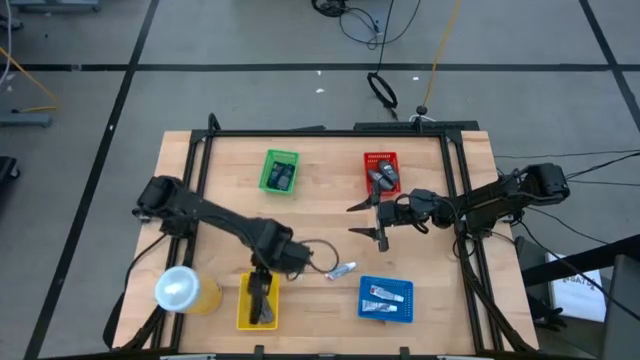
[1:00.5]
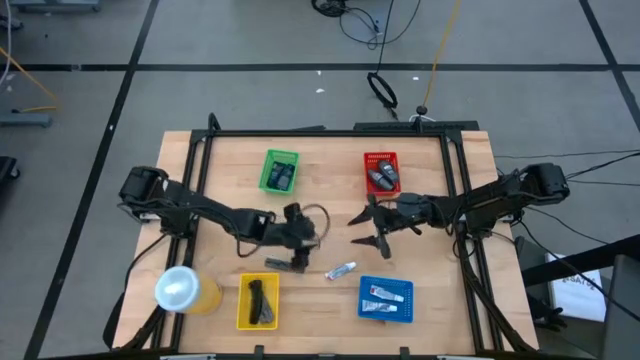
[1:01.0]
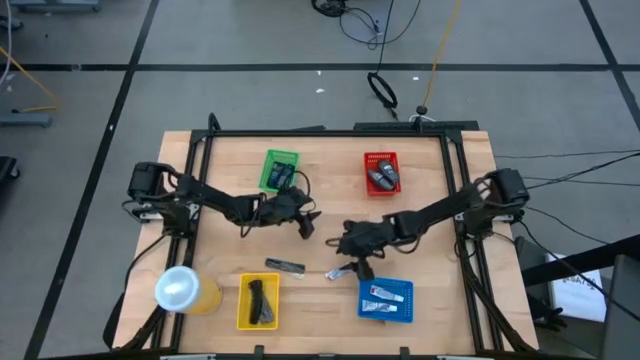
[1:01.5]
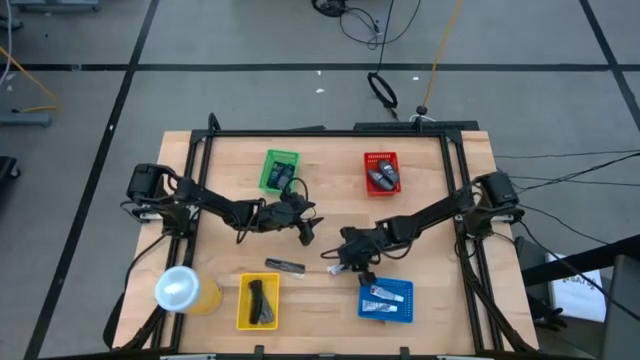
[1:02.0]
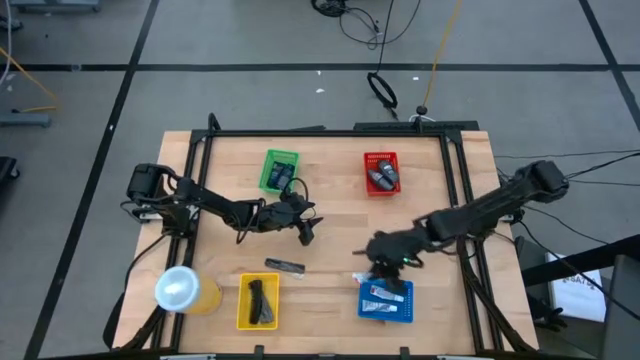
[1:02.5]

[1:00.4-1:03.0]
Task: Pick & Place Travel size toiletries
Put the white toothpaste into the blue bin

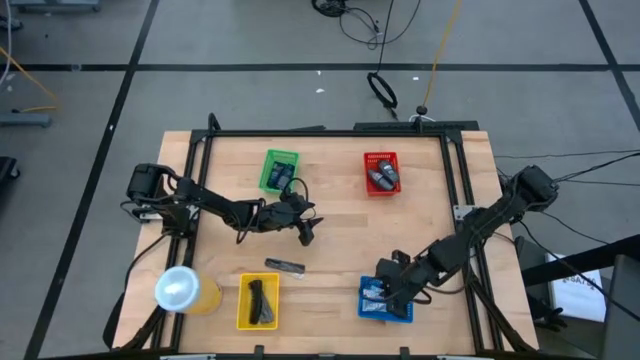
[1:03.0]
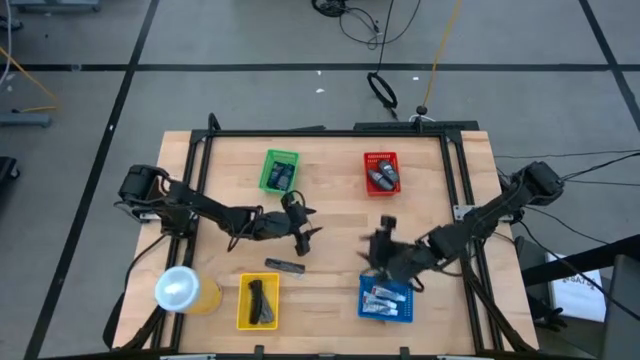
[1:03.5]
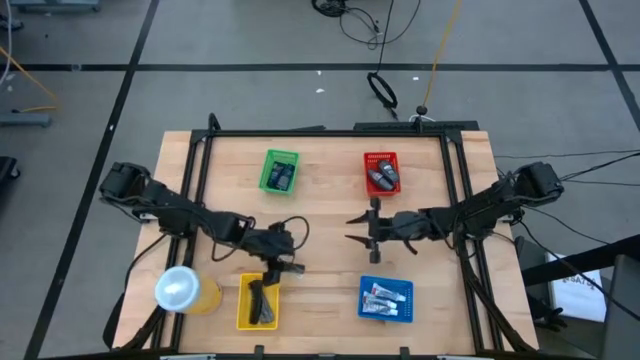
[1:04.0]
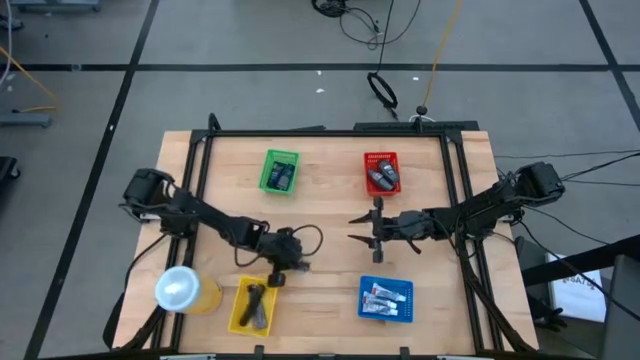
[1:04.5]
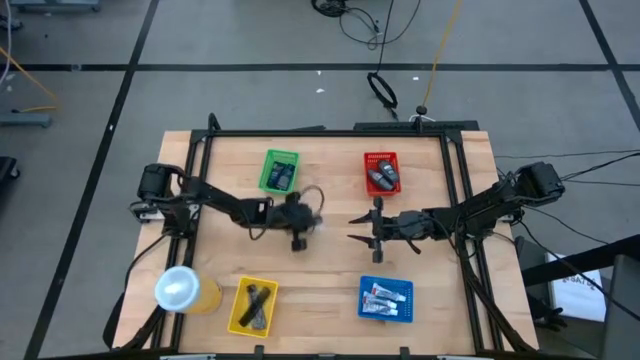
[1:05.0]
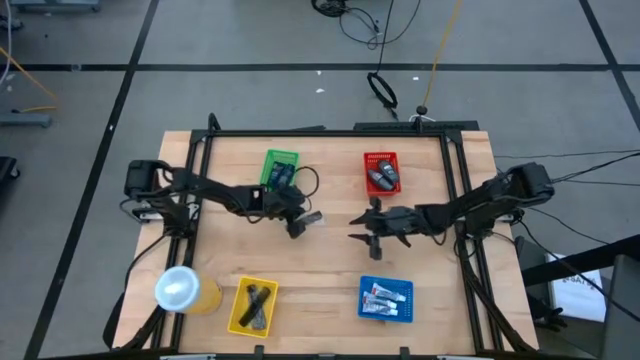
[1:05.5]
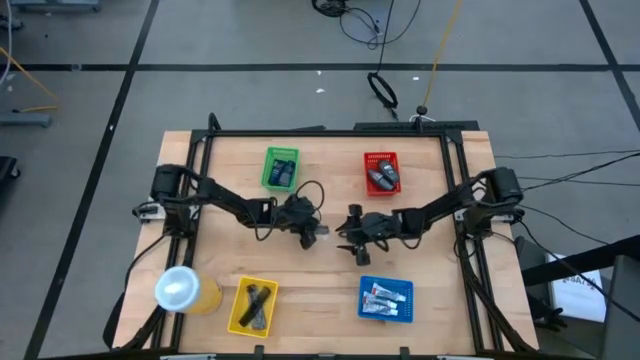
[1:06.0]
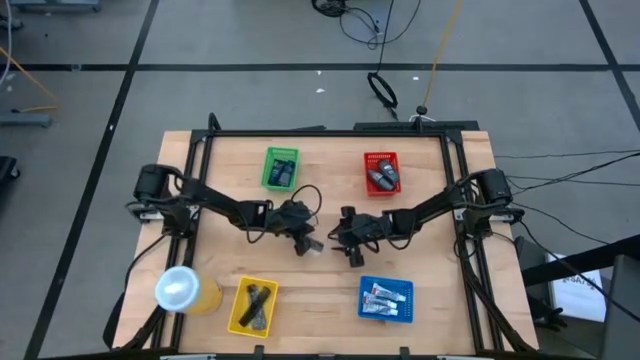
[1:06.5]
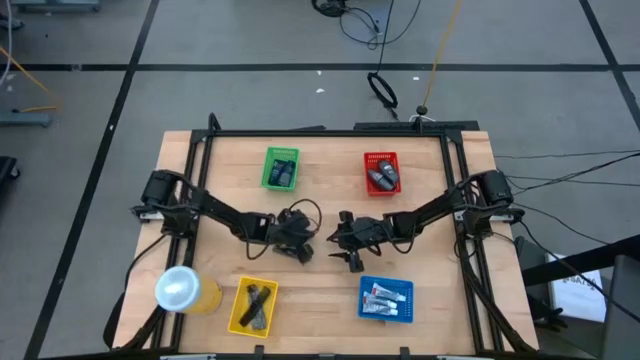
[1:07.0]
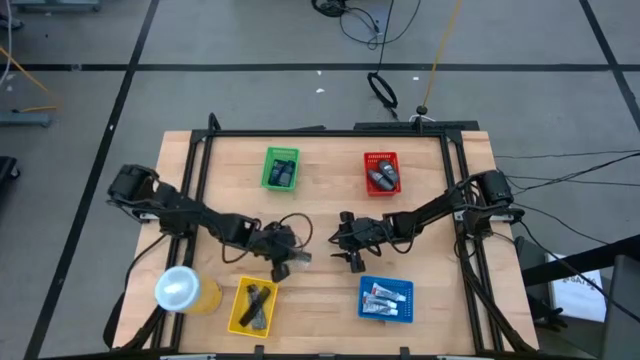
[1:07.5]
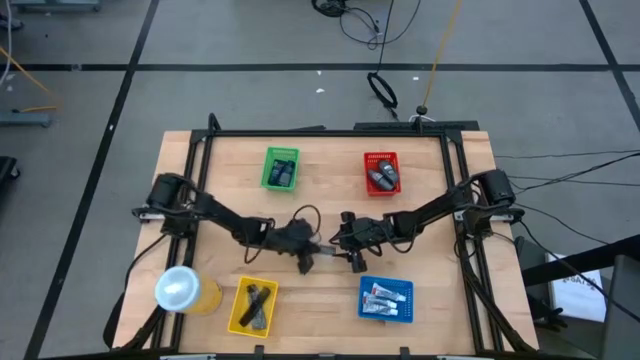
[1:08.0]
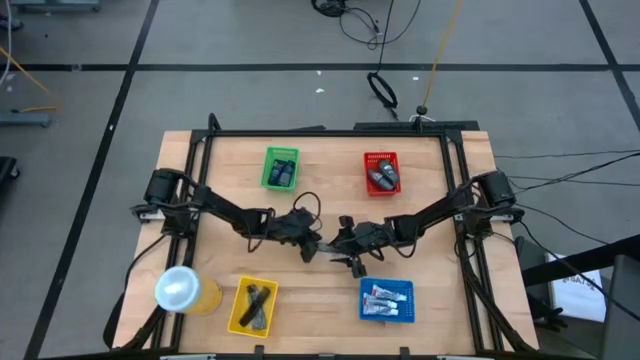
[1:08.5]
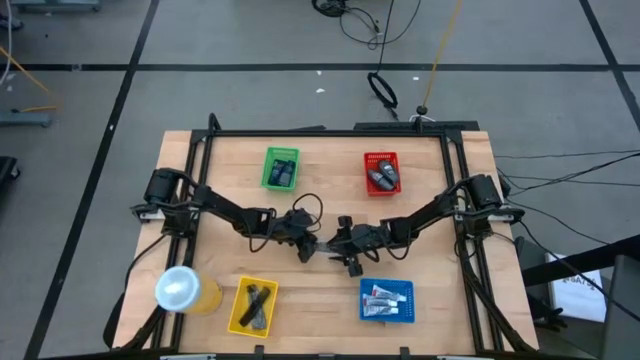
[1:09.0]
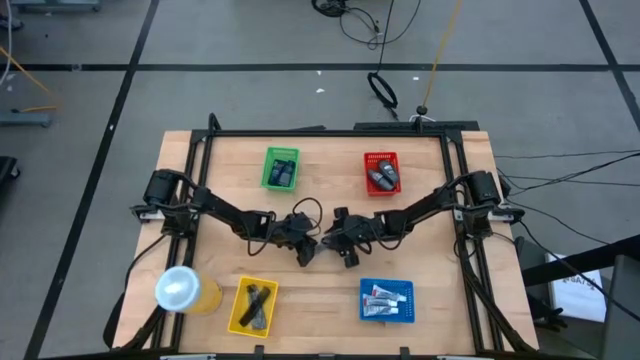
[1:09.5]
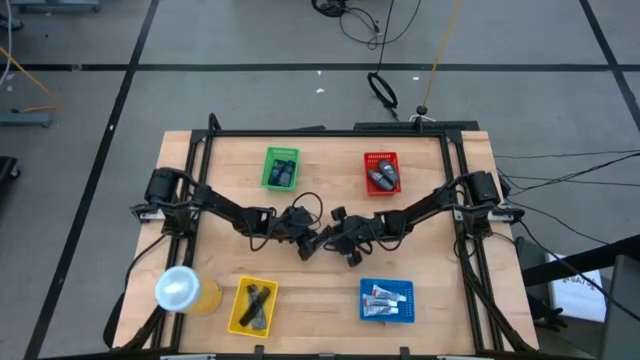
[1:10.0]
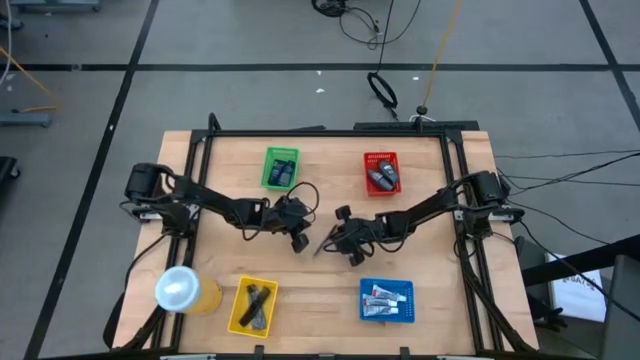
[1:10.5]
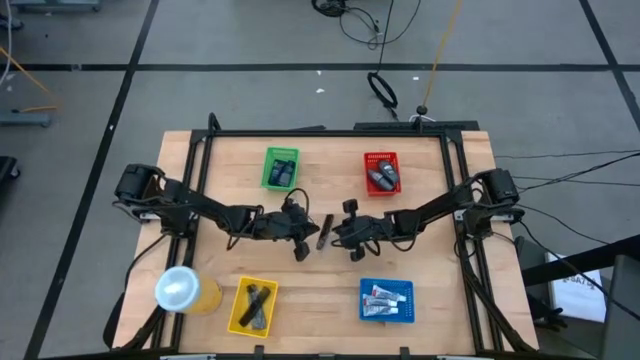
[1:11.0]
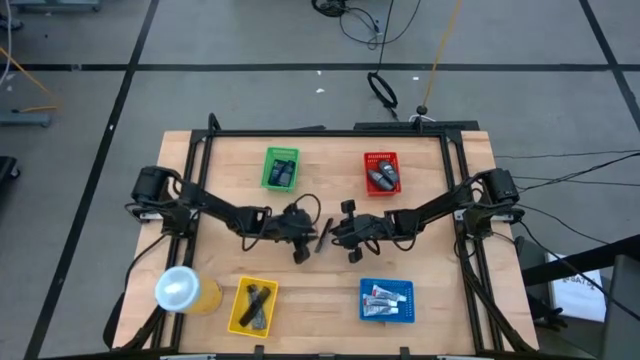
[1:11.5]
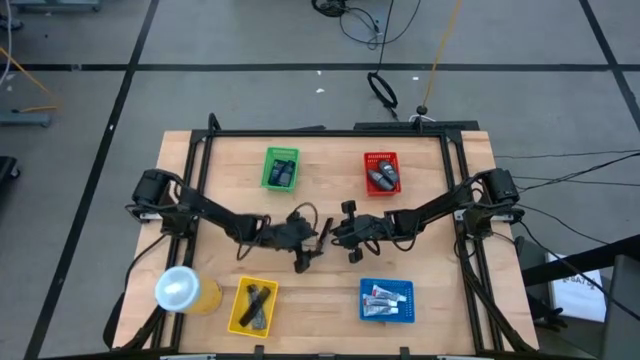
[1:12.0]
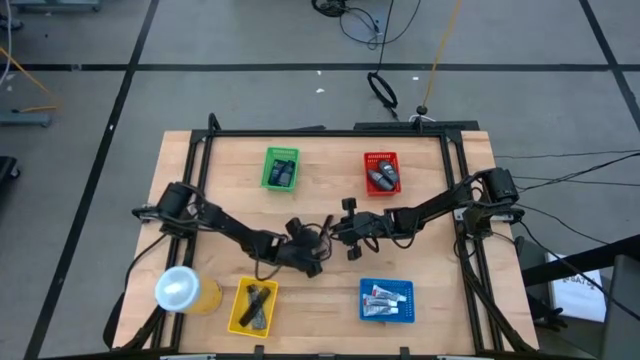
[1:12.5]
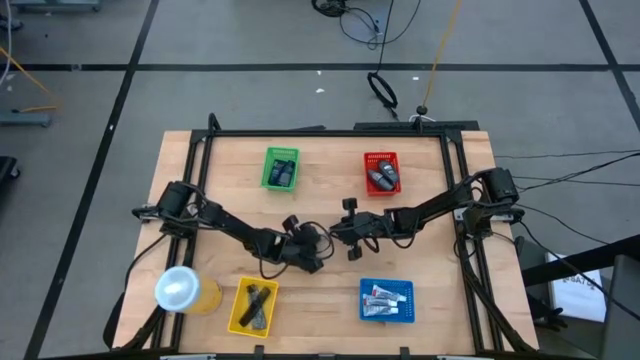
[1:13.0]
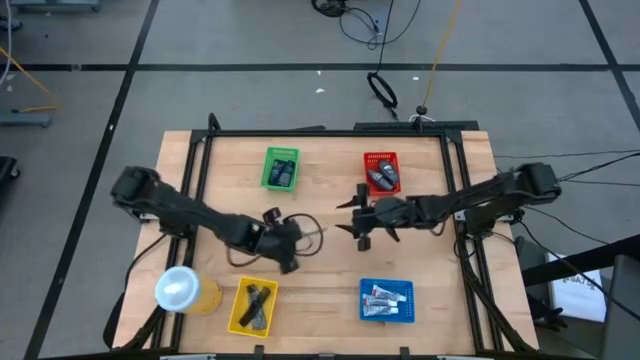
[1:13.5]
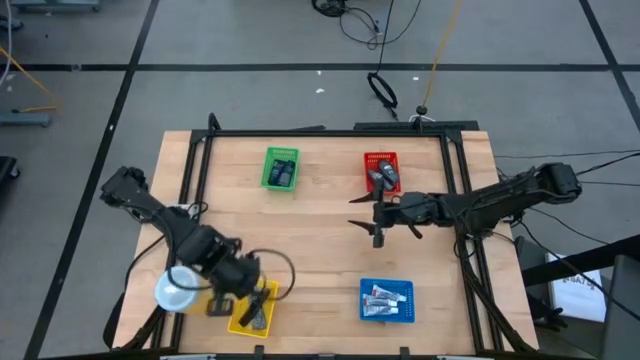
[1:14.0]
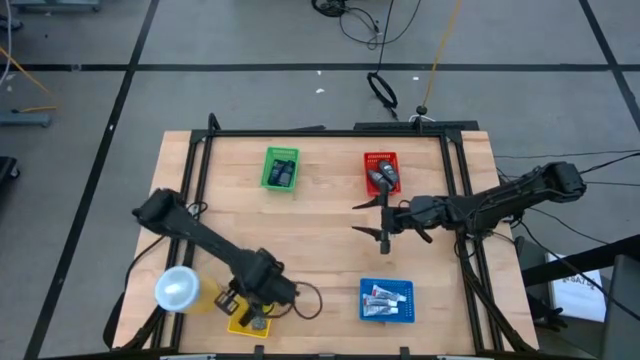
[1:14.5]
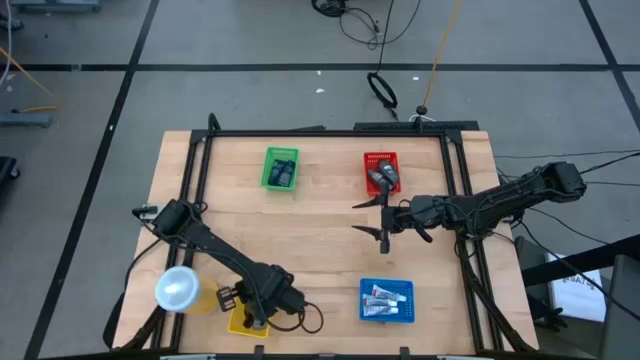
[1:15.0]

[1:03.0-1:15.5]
Put the black hairbrush into the yellow bin

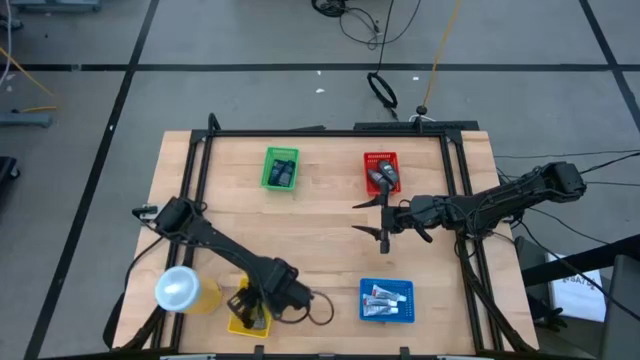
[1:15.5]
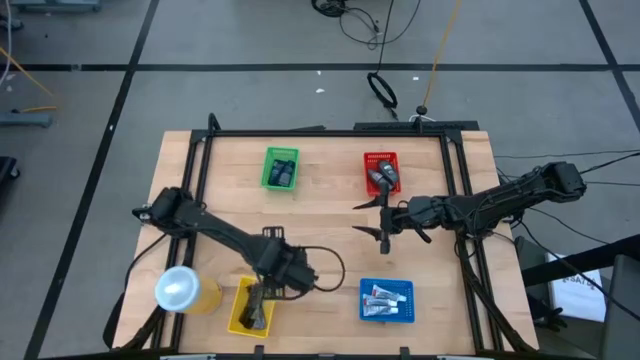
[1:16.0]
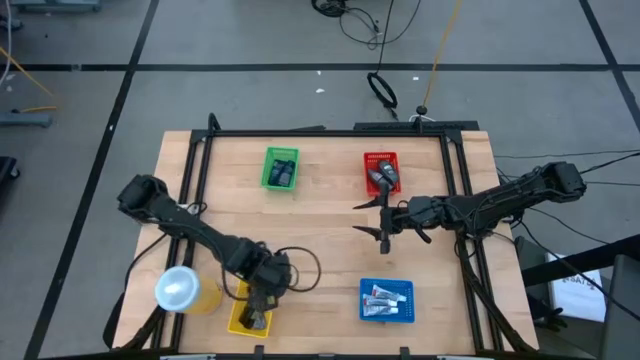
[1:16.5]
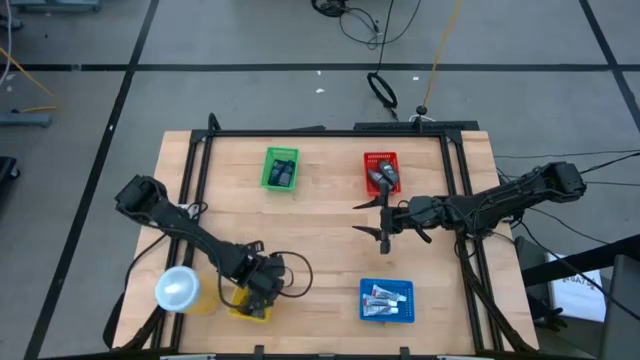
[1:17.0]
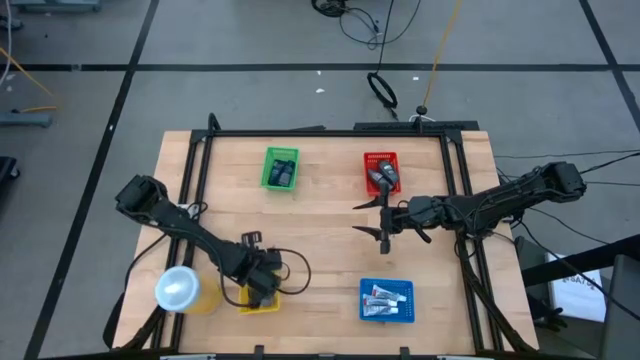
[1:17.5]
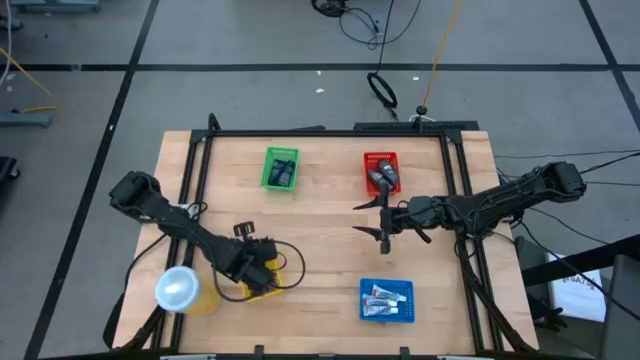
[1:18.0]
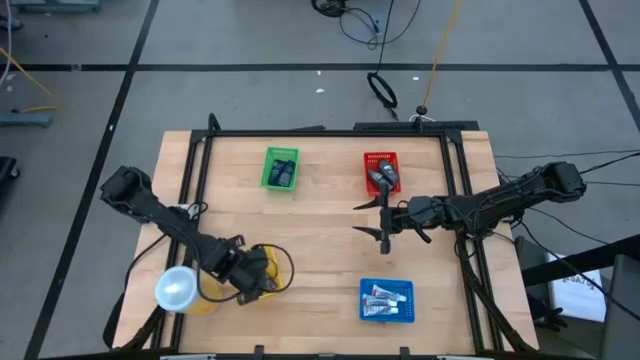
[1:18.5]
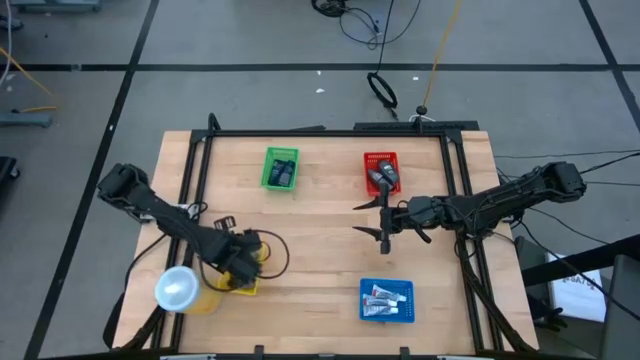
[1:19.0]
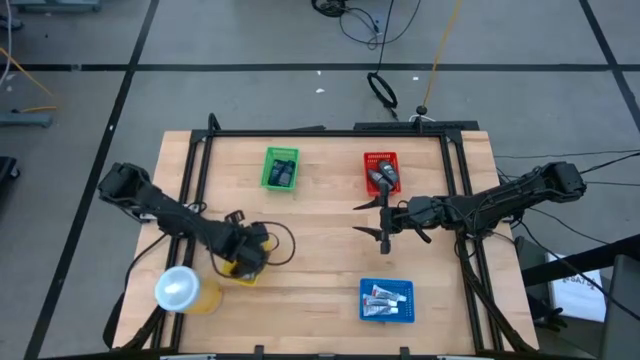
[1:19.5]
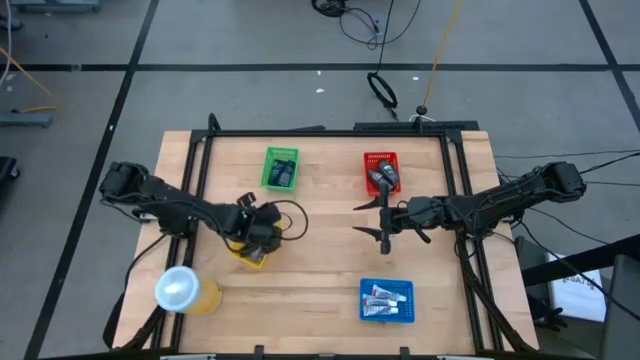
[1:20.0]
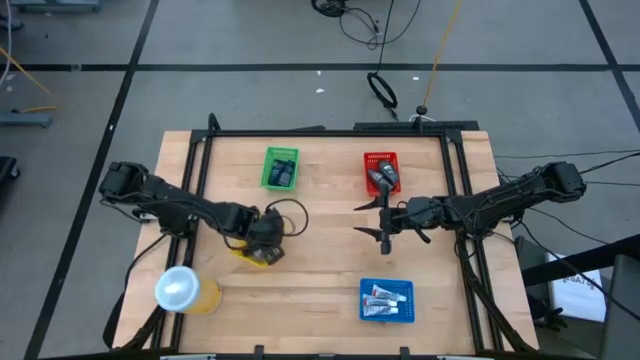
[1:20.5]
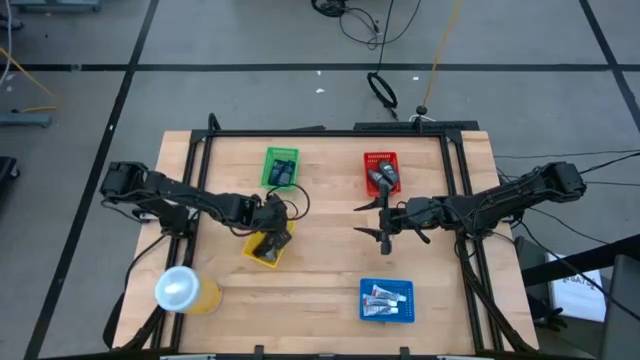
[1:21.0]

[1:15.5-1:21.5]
Adjust the yellow bin

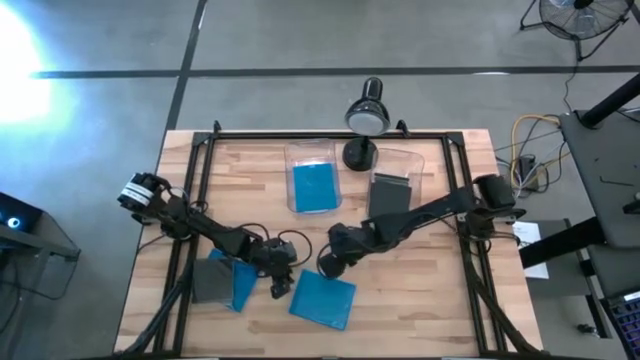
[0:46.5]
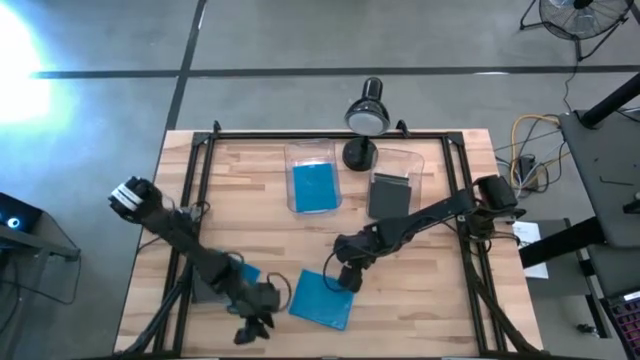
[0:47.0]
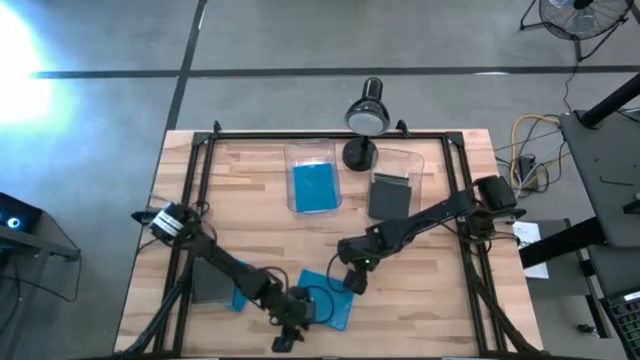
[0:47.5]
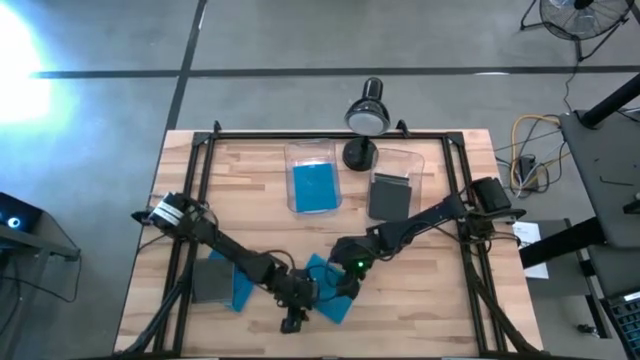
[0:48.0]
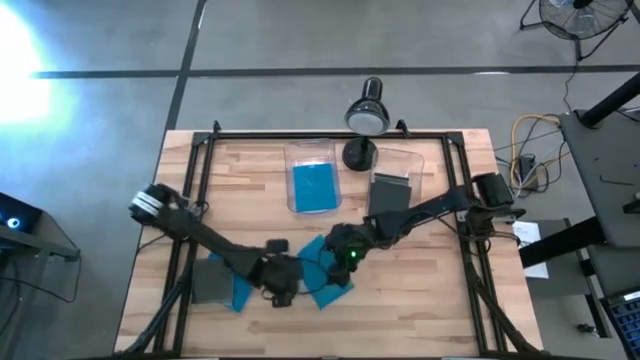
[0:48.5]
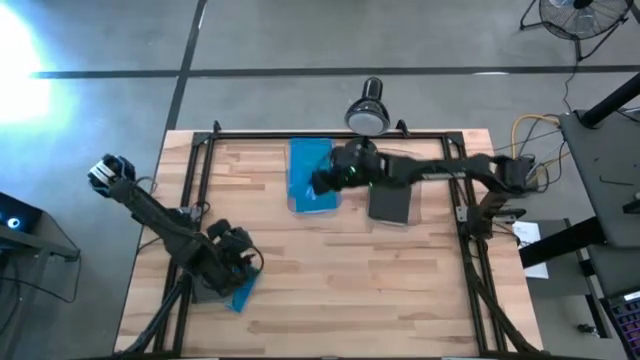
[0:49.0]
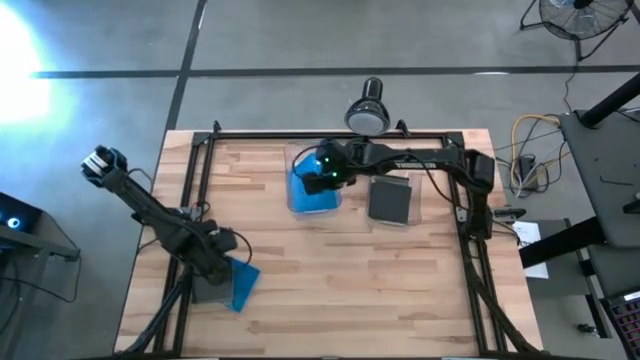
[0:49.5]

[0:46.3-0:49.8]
Task: Pick & place jewel cases by type
Put the blue CD case into the left transparent bin
